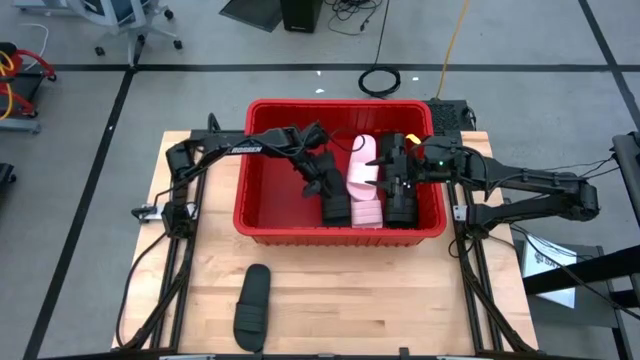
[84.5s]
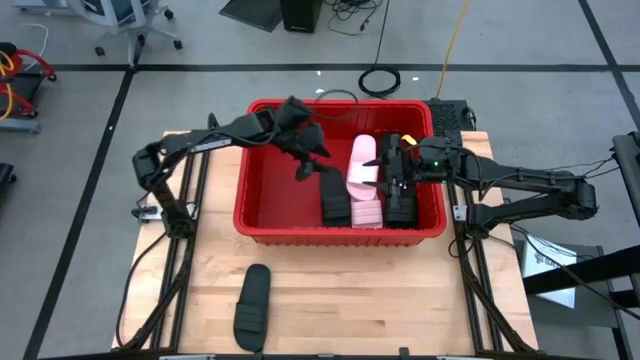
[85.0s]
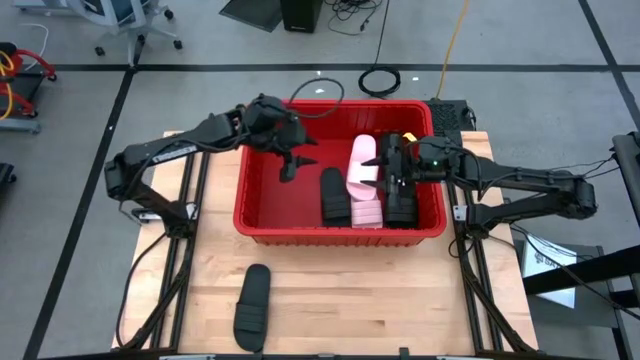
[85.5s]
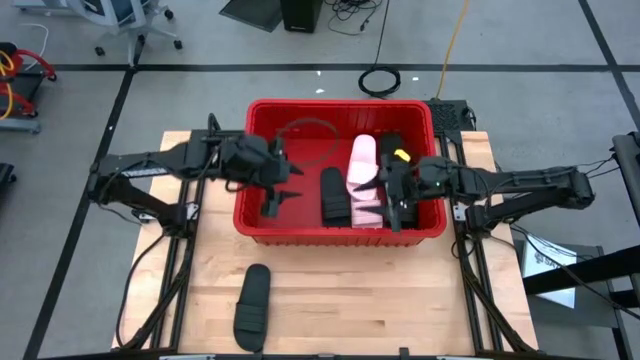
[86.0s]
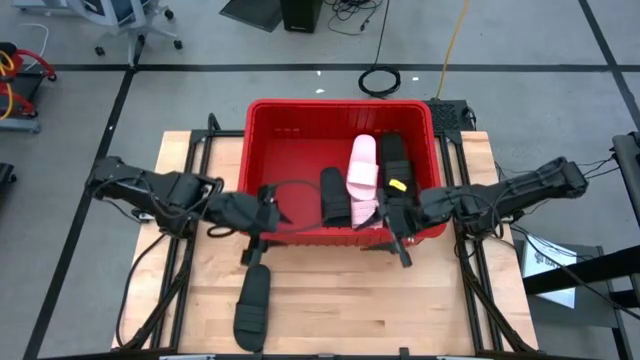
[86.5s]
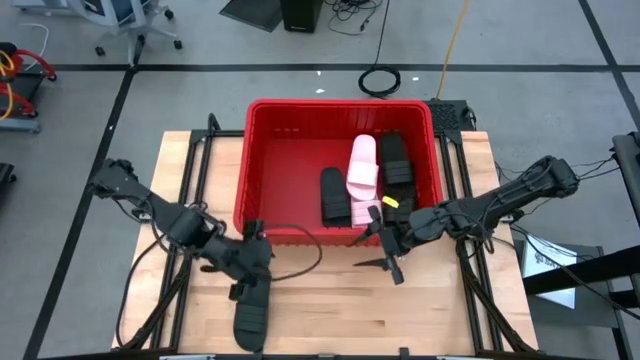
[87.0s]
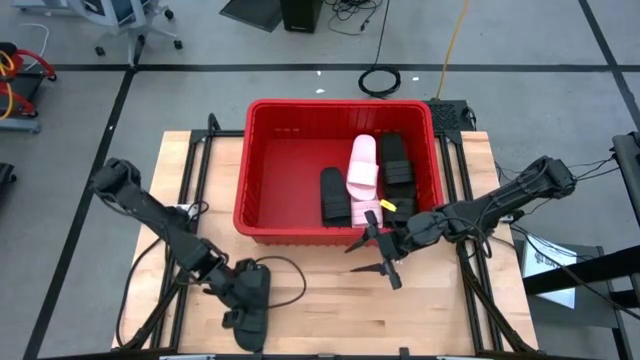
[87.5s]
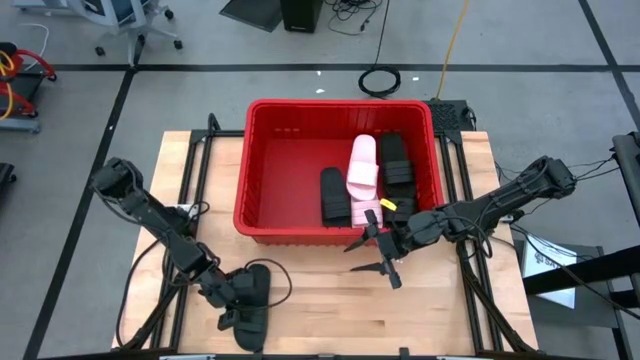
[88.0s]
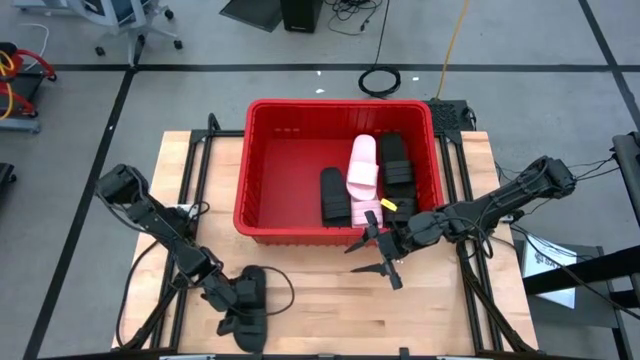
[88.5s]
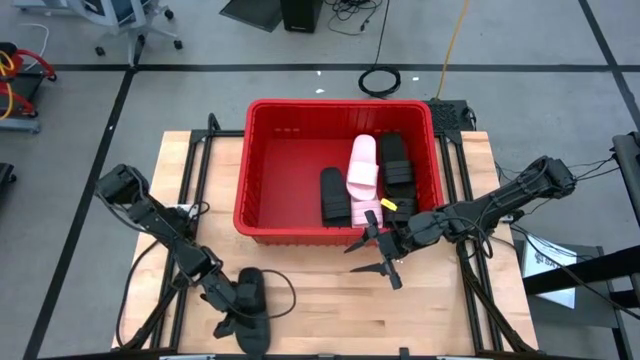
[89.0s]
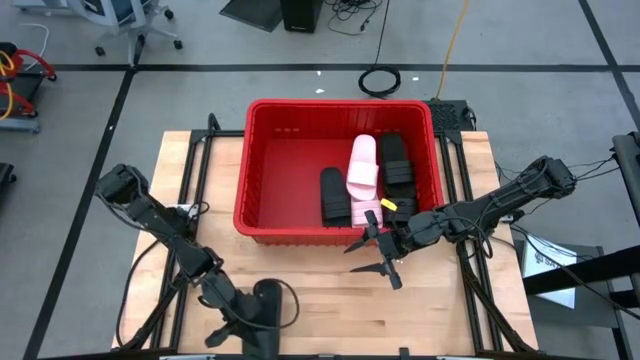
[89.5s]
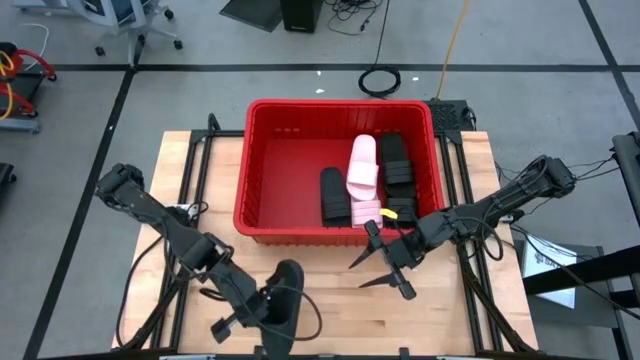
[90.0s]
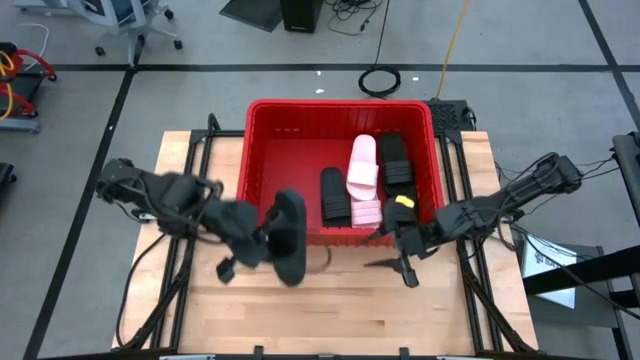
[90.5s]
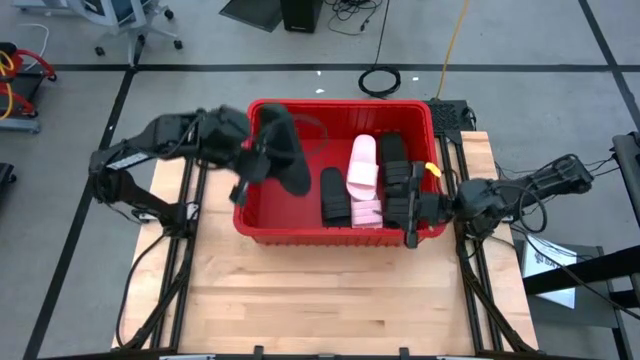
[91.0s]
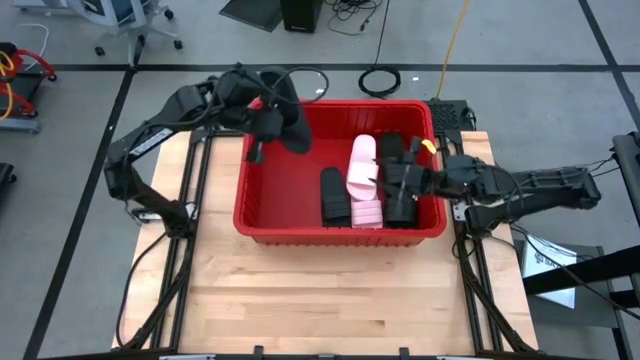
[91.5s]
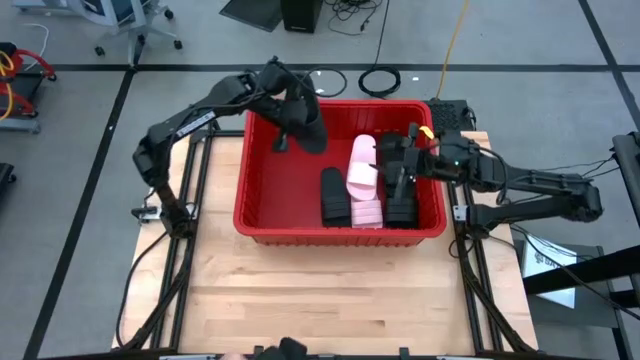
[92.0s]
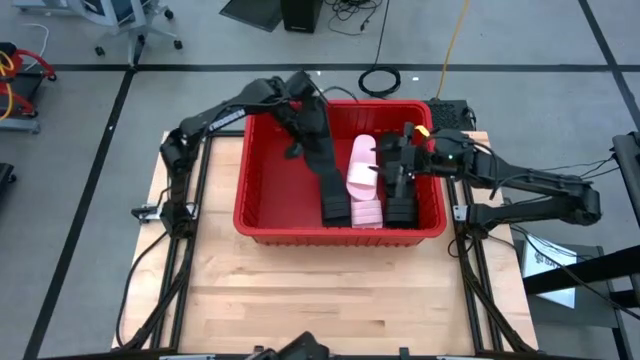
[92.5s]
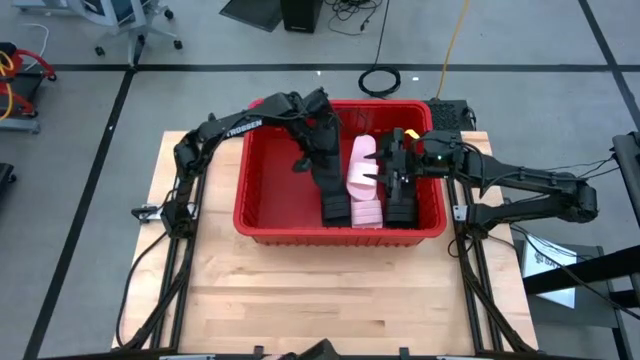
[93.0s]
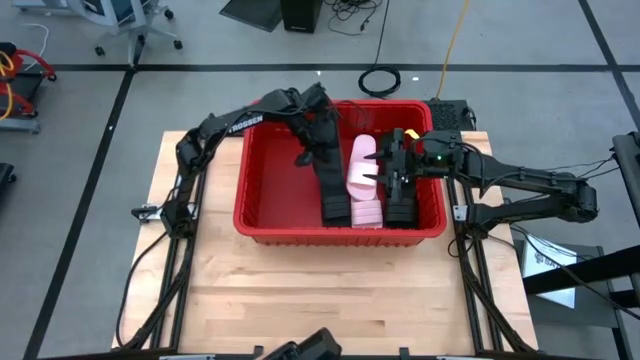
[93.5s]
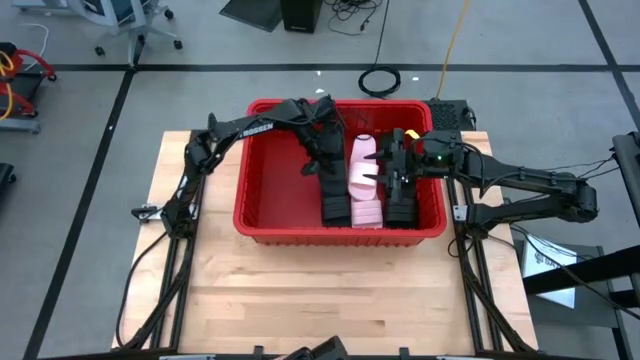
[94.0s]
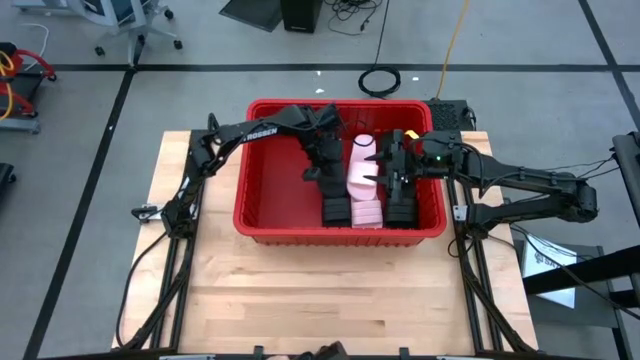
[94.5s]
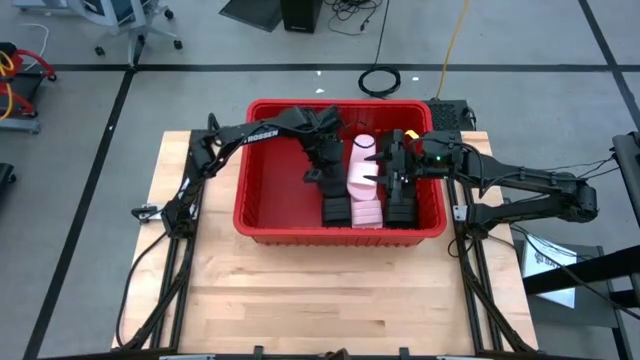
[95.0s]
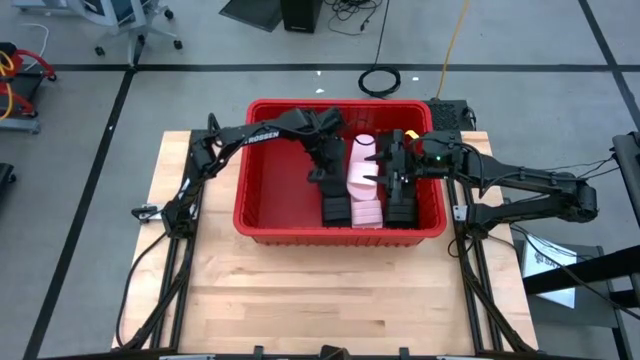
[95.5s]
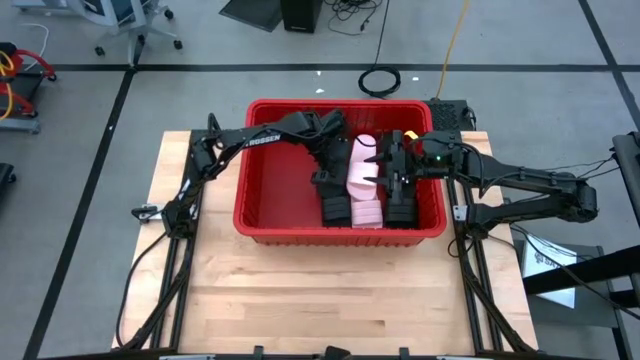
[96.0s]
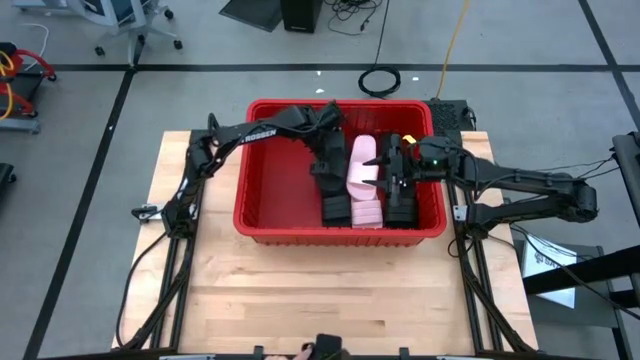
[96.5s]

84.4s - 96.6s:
Task: Pick and place slides into bin
Put the black slide into the red bin

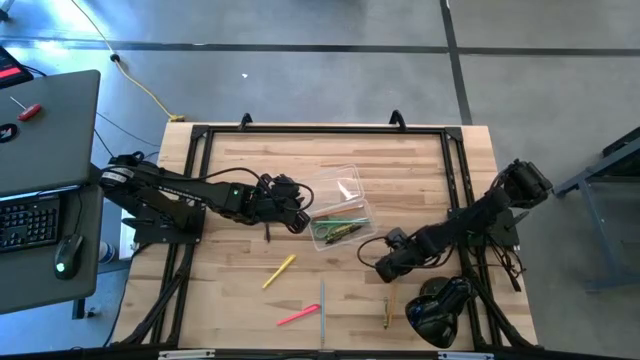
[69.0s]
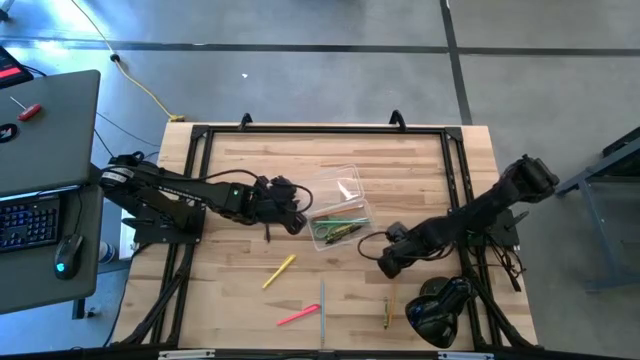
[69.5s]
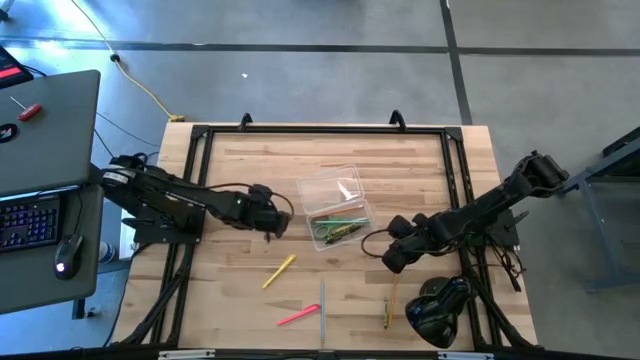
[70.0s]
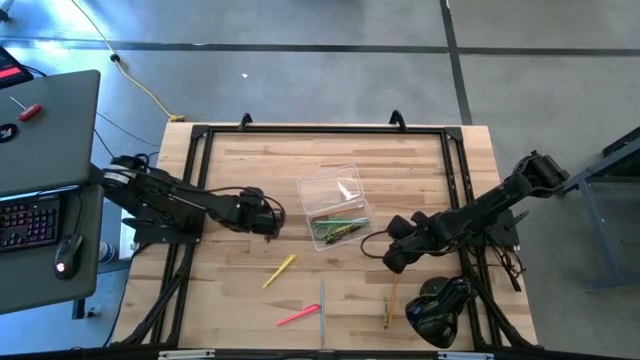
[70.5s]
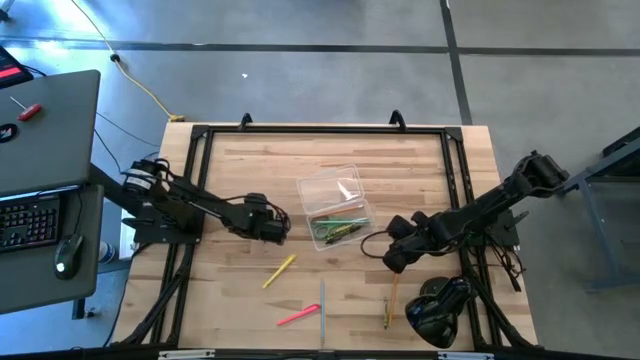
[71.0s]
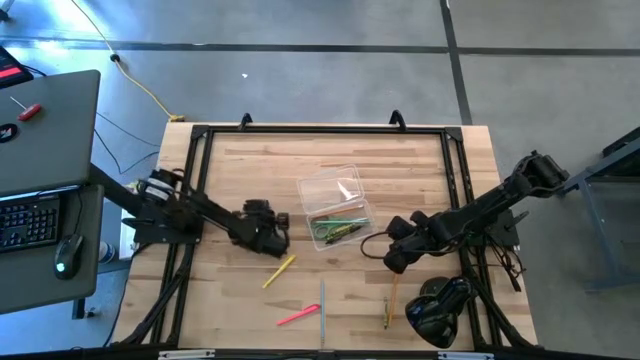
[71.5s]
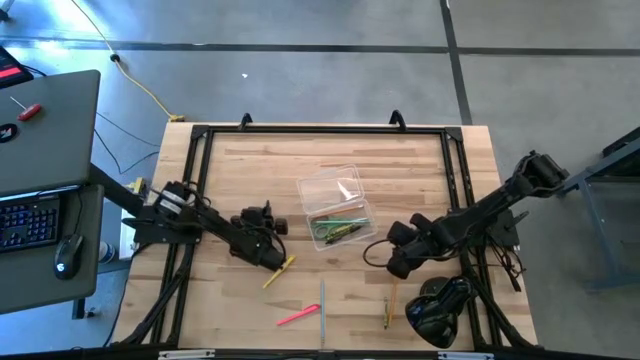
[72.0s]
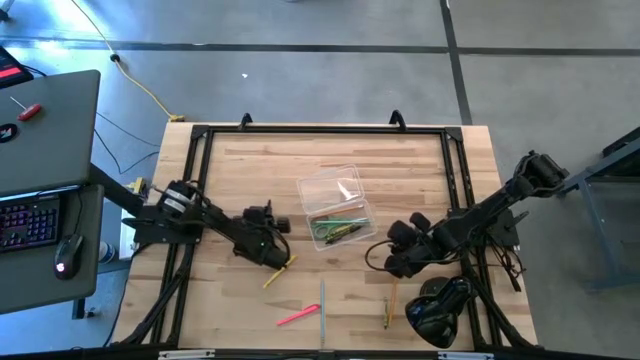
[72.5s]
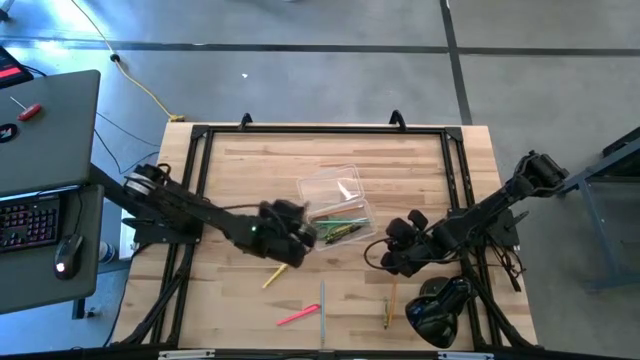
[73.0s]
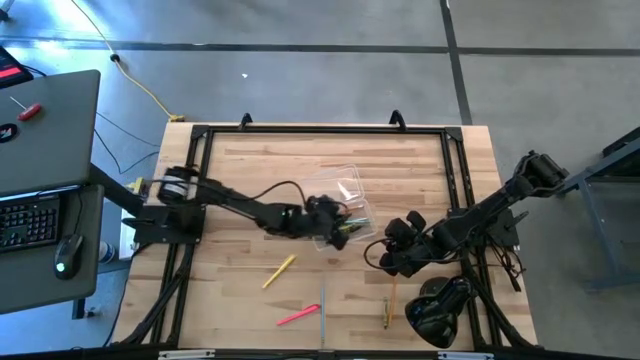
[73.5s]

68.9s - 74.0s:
Task: Pick & place school supplies into a supply box
Put the black pen into the supply box

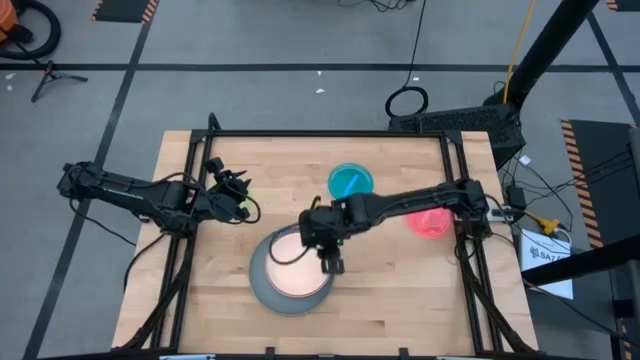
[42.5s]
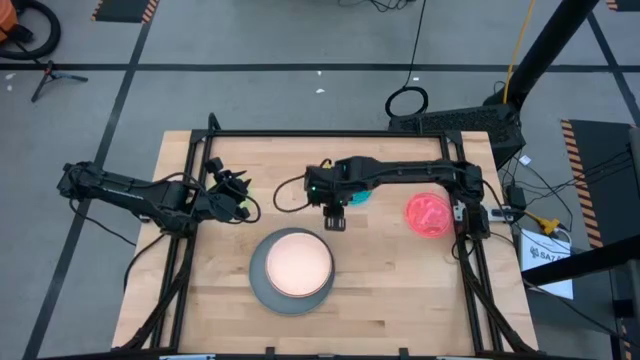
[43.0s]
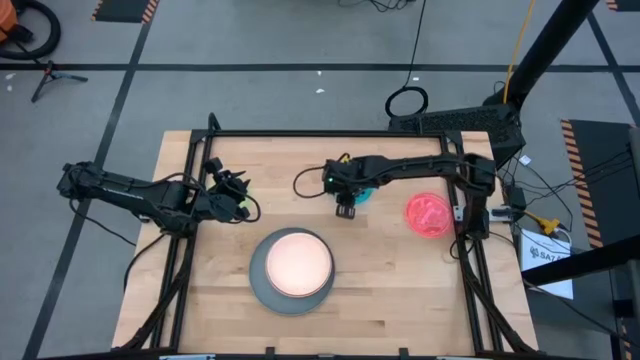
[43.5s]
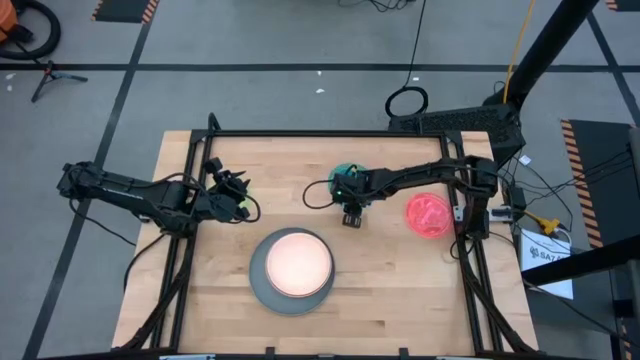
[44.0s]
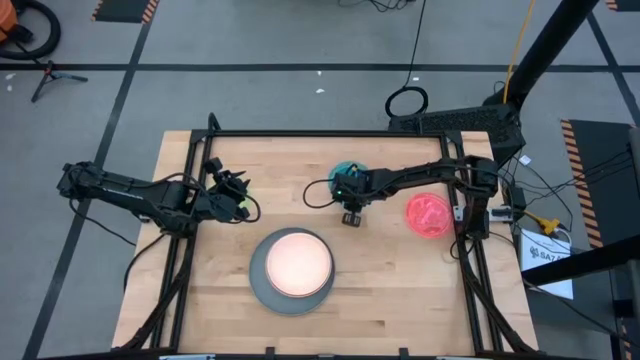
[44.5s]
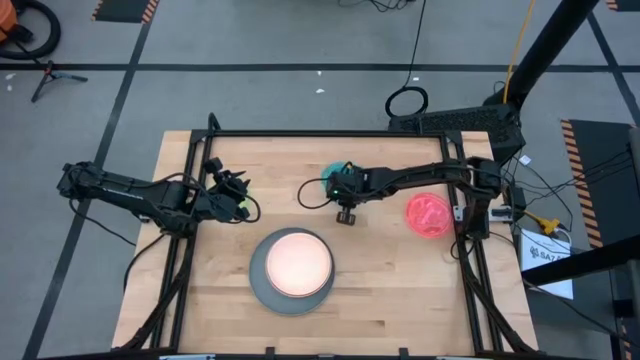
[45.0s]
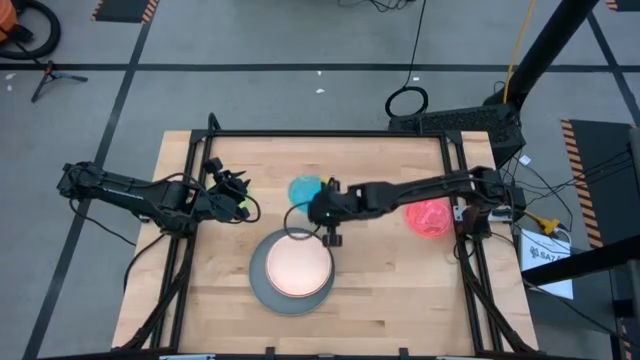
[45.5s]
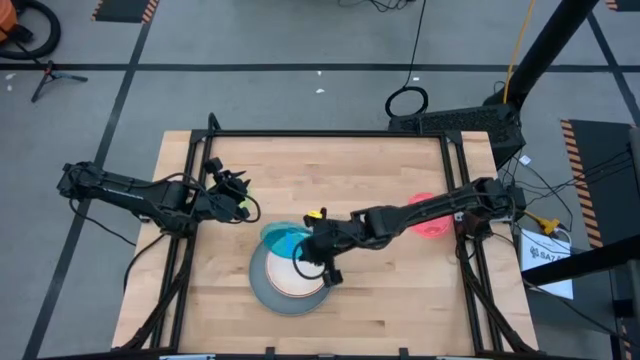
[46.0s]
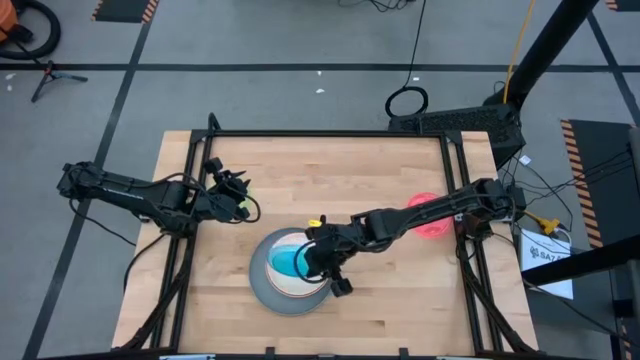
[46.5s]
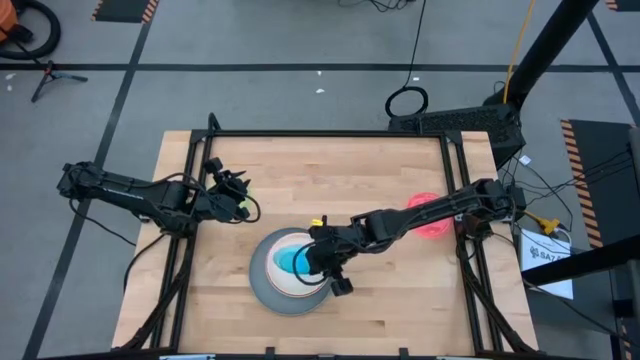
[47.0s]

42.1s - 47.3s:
Task: Stack plastic plates
Stack the blue plate on top of the light orange plate
